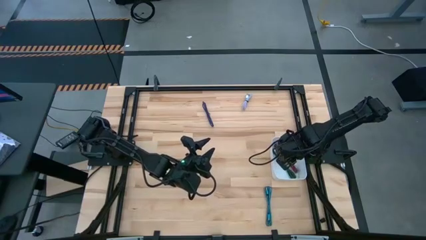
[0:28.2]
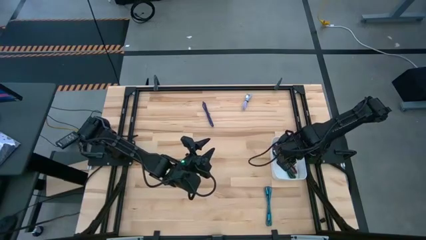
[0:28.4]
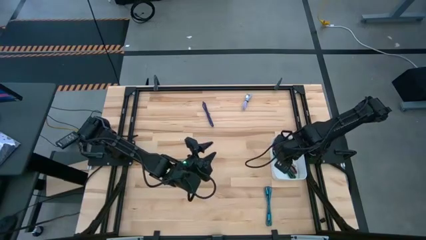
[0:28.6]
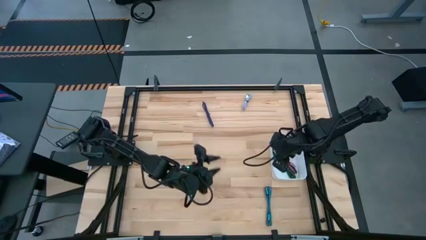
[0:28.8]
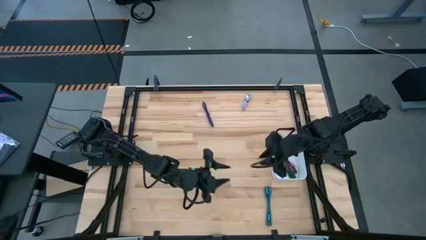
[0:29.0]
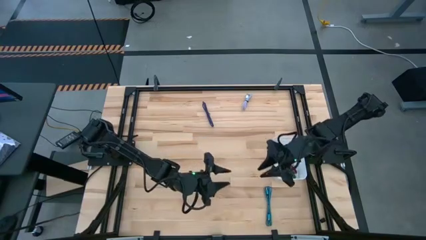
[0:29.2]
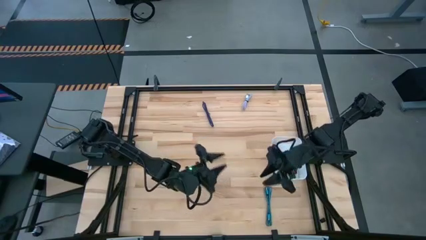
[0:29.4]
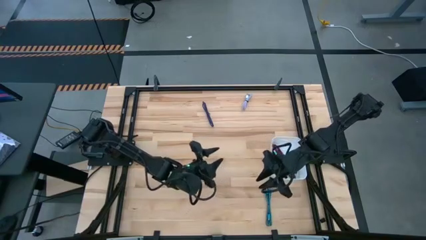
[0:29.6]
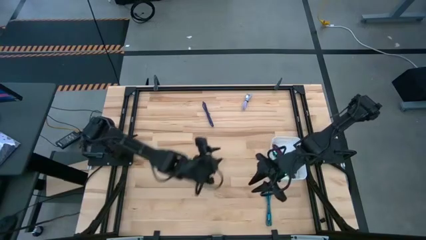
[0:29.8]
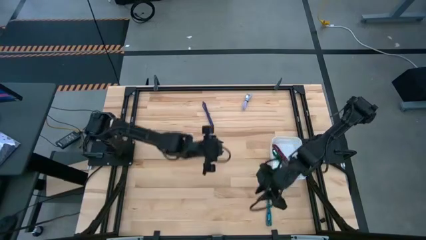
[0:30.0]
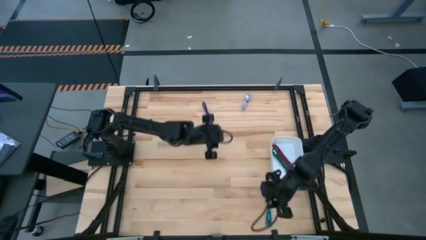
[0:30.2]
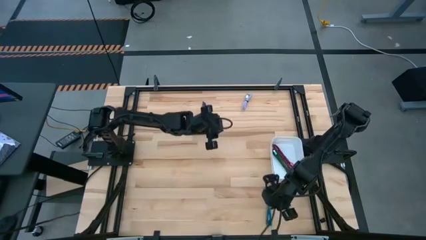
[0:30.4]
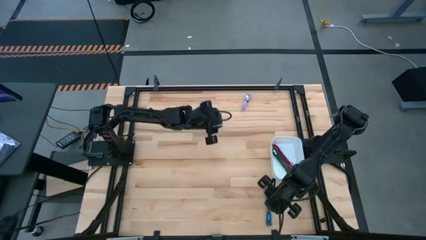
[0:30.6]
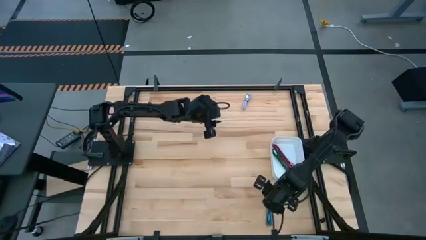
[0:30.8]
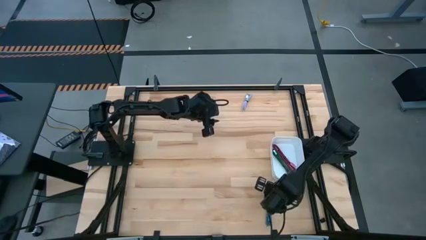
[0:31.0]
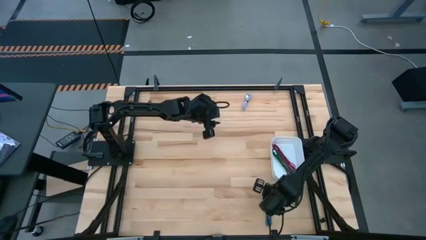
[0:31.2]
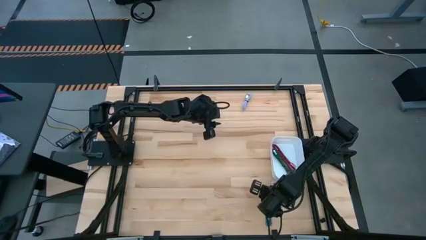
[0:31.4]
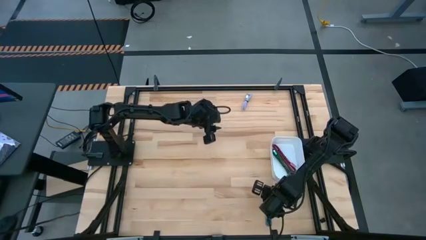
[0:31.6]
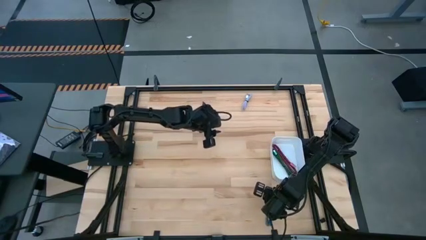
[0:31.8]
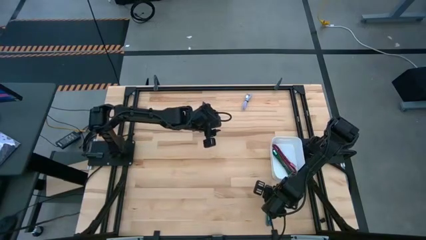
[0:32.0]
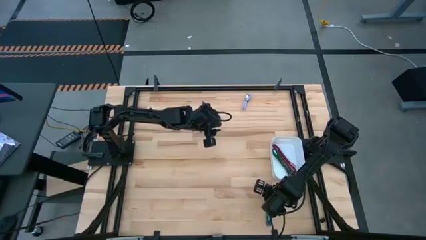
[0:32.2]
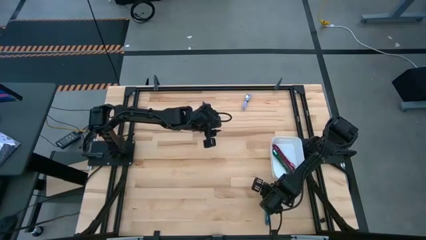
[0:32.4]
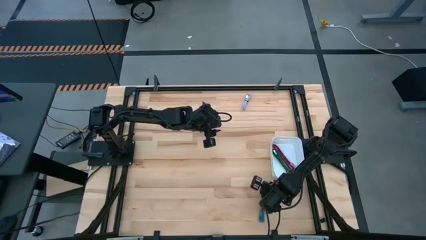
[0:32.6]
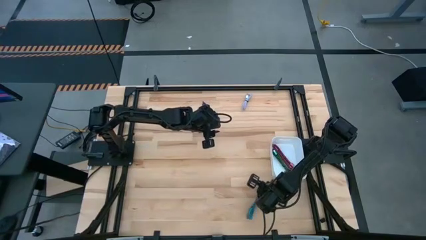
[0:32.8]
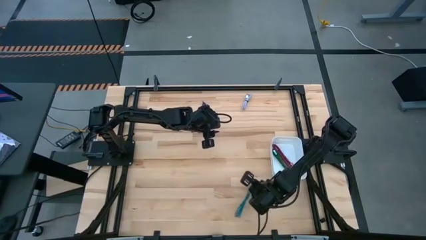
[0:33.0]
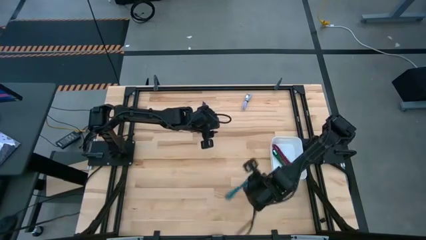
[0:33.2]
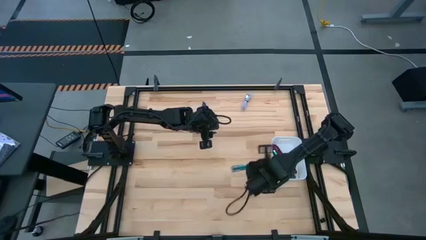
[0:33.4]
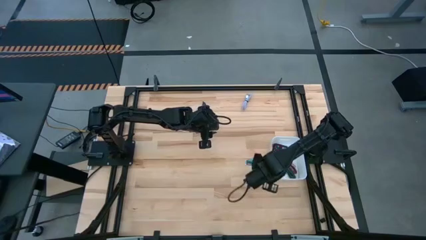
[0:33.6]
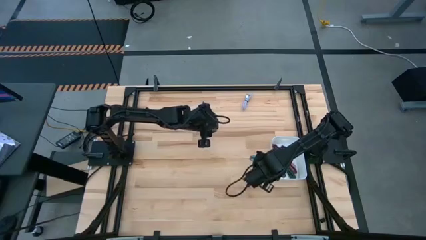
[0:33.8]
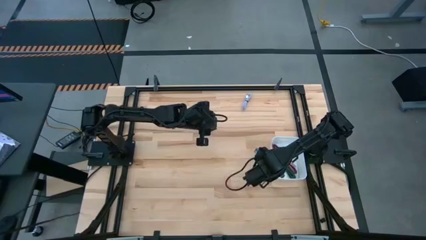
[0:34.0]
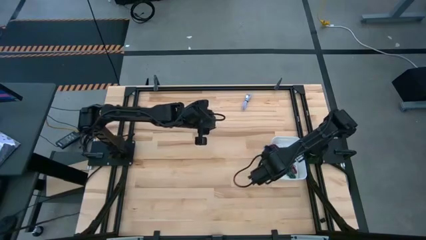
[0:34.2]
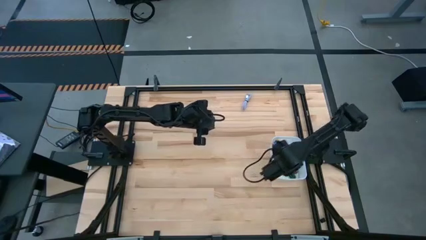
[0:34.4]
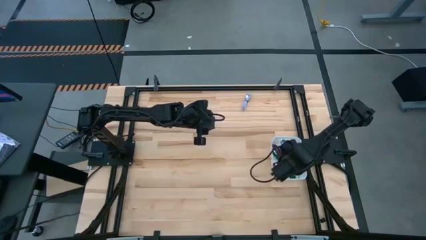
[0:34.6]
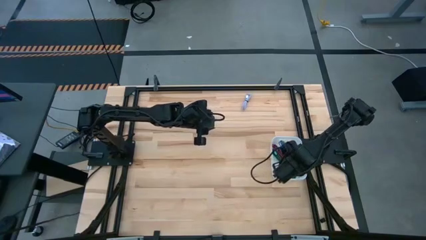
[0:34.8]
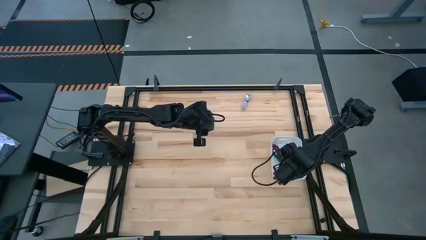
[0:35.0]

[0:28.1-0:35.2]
Task: Pick and place USB-C Cables
Put the blue charger cable into the white bin

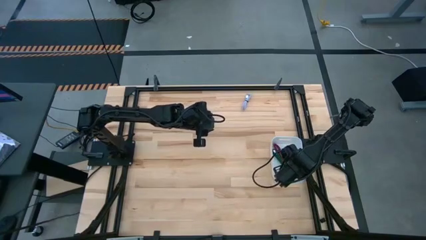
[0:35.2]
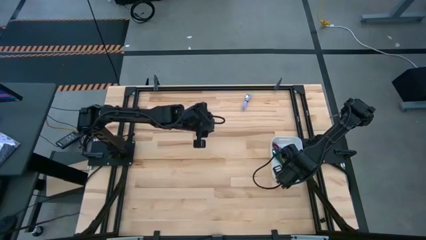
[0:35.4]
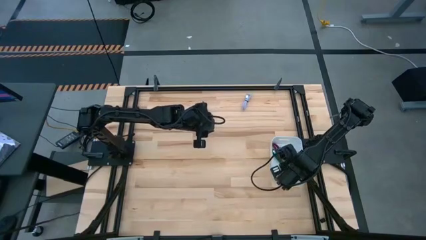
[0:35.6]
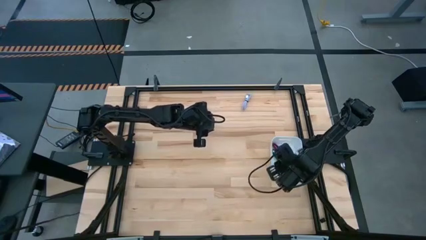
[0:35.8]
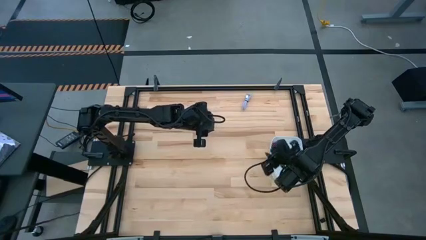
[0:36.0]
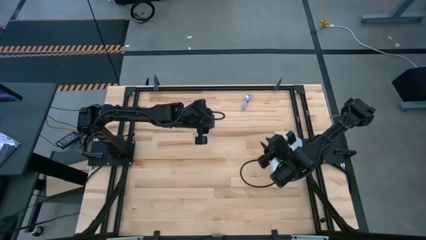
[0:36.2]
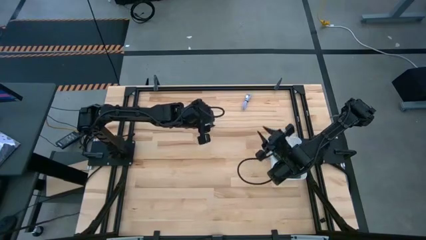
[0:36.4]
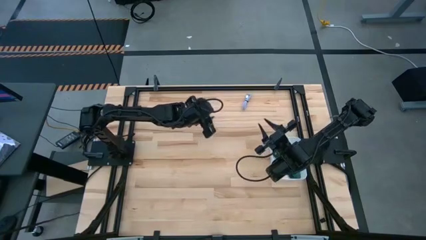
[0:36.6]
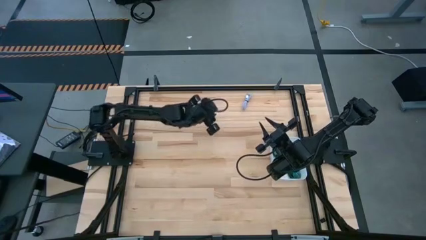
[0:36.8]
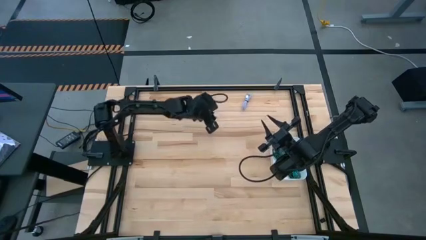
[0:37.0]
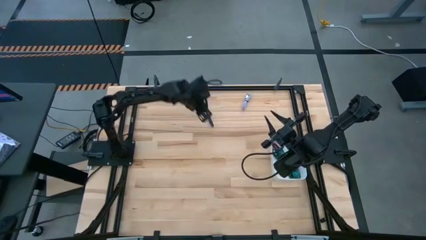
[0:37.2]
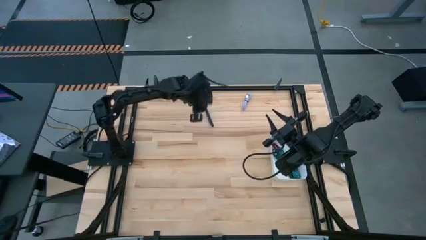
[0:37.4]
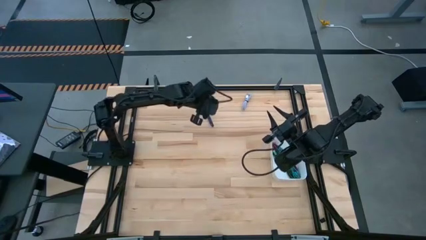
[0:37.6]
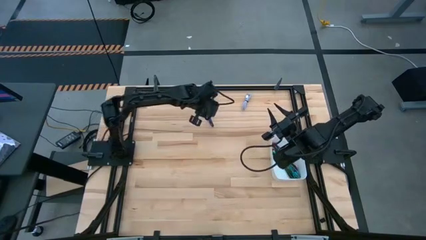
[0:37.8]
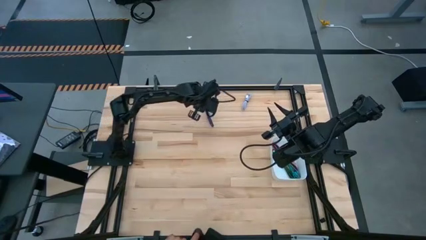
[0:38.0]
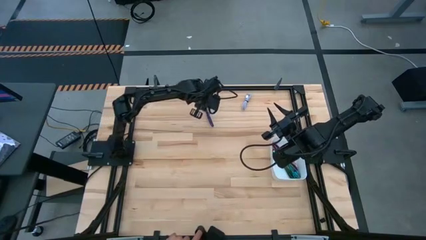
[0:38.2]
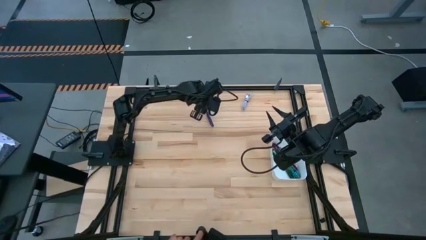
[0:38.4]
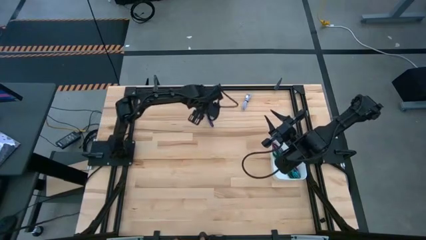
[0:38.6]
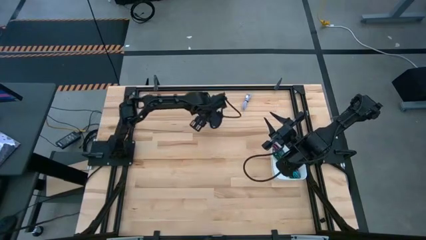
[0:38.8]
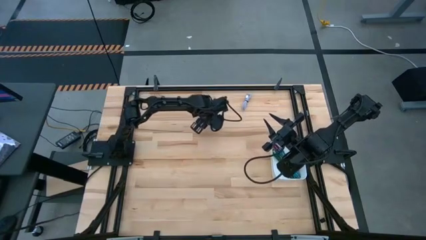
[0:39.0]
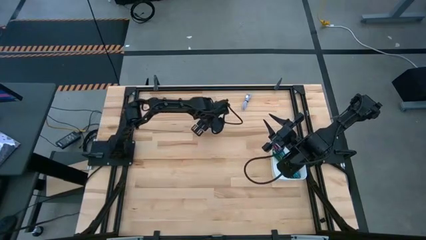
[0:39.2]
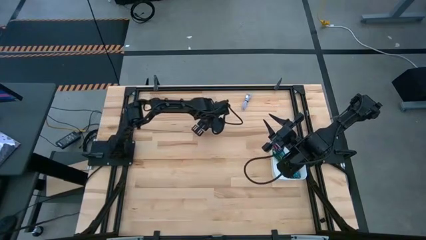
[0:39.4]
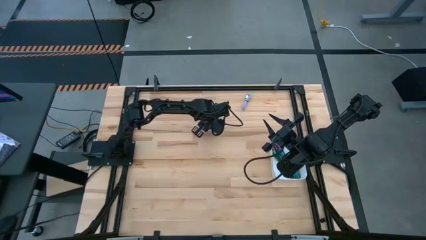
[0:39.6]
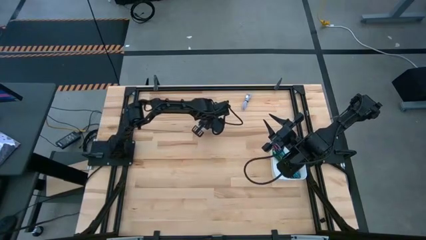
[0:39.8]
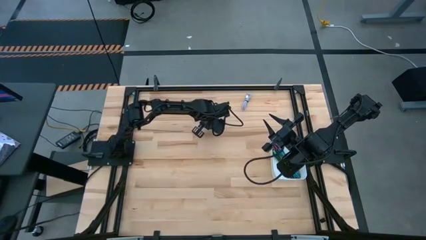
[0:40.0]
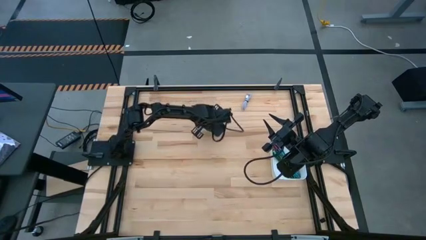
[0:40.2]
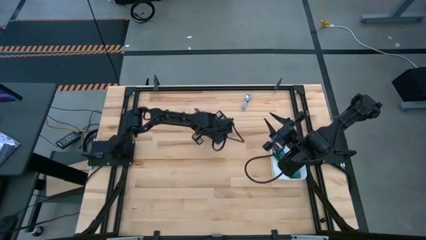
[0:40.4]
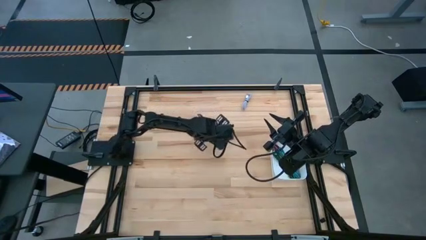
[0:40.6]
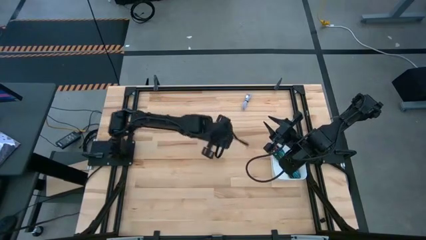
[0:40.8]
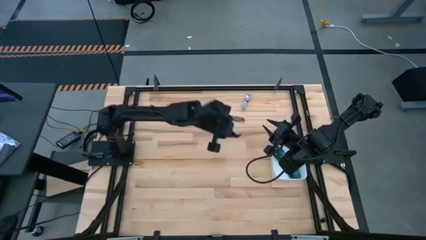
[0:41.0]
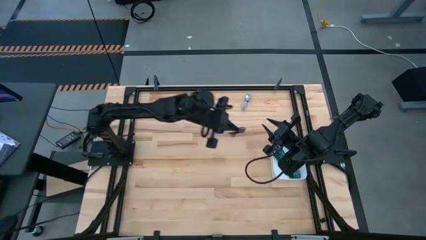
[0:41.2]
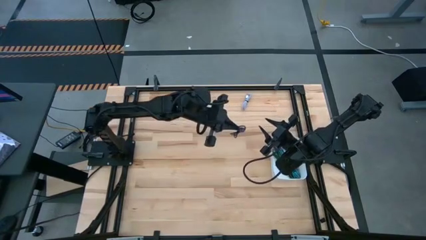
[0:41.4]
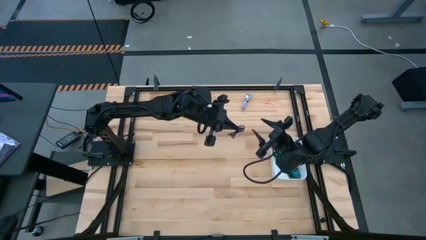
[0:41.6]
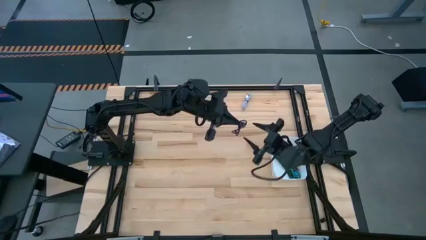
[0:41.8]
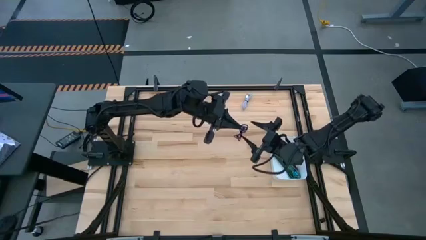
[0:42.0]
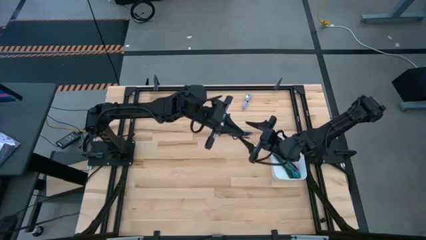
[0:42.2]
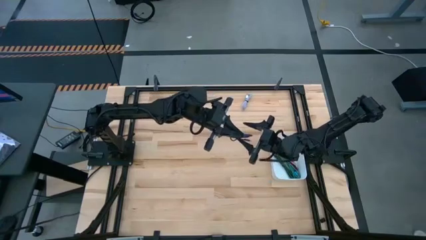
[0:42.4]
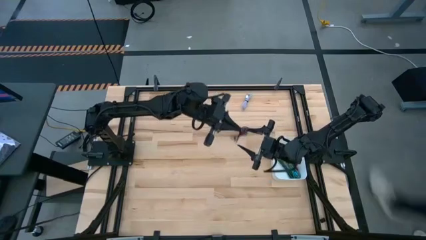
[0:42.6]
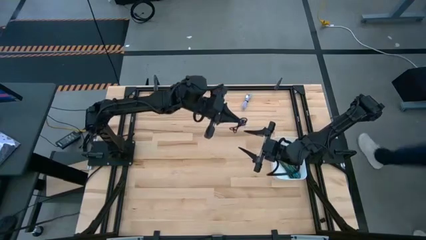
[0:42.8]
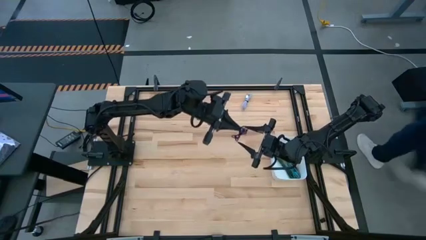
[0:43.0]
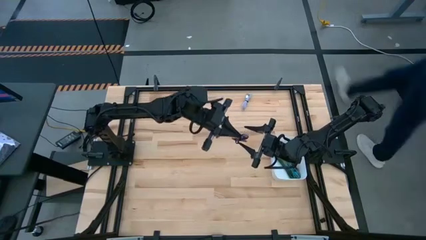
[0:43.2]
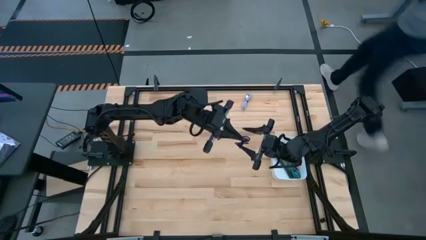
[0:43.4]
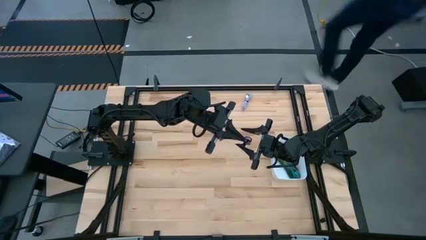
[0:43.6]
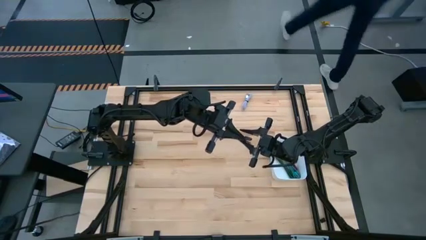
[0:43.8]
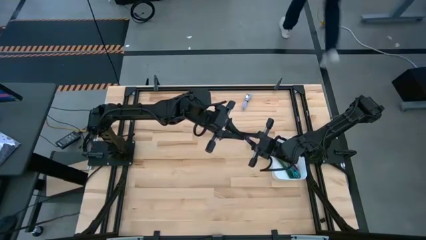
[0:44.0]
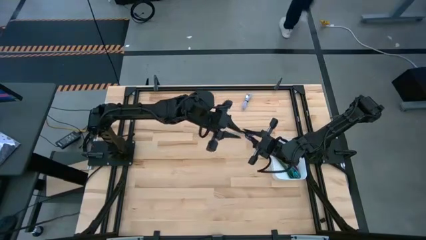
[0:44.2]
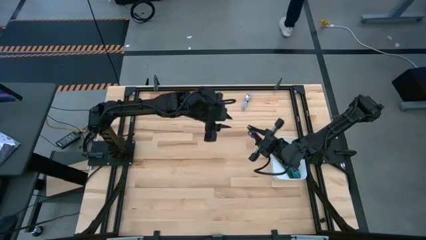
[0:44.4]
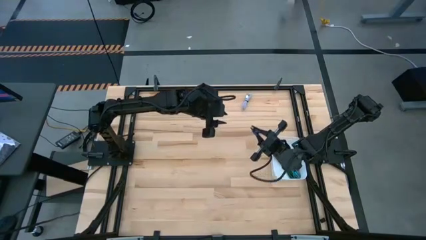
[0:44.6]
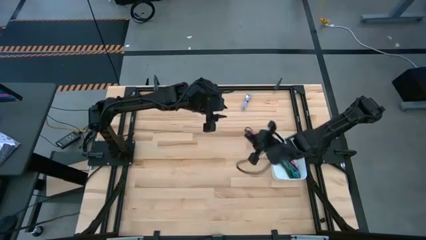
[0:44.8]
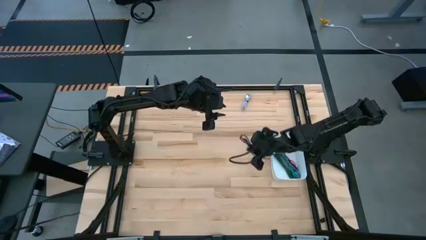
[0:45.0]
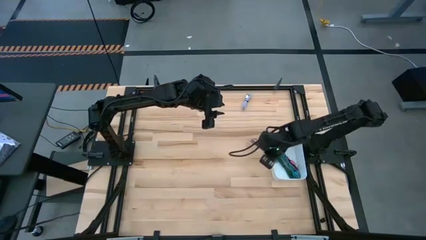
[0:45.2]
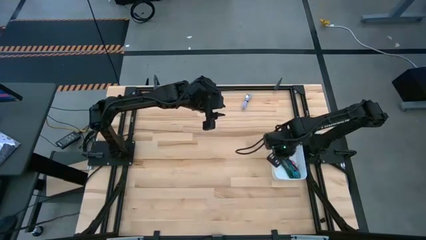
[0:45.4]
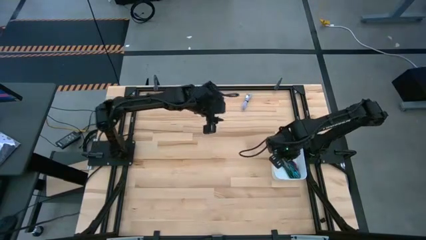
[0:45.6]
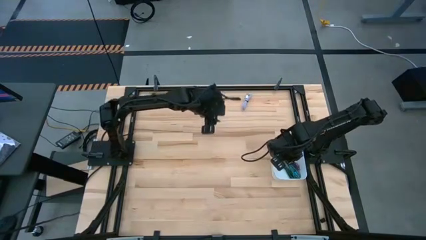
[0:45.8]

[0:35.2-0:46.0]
Put the purple charger cable into the white bin
